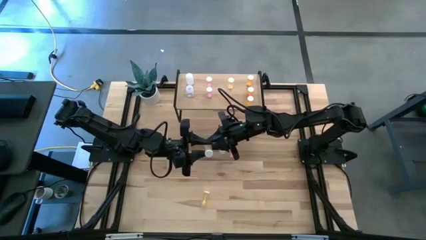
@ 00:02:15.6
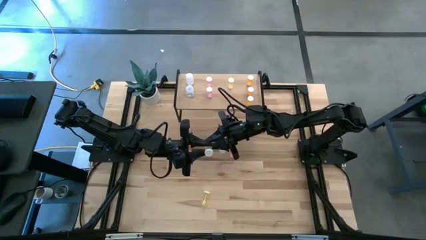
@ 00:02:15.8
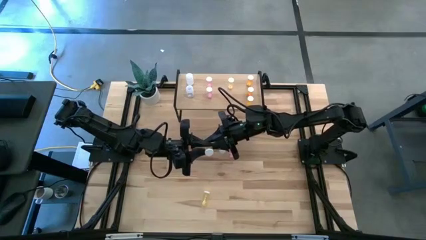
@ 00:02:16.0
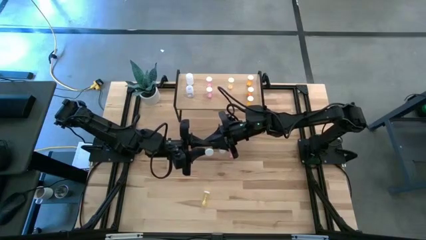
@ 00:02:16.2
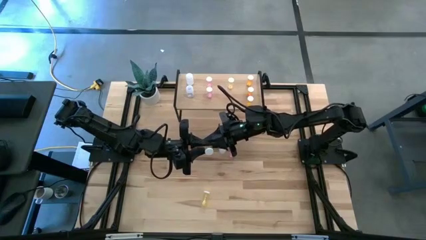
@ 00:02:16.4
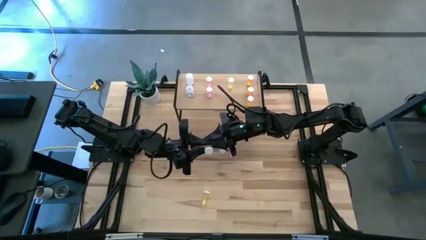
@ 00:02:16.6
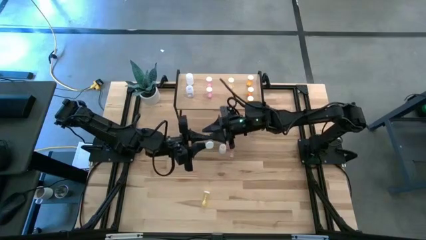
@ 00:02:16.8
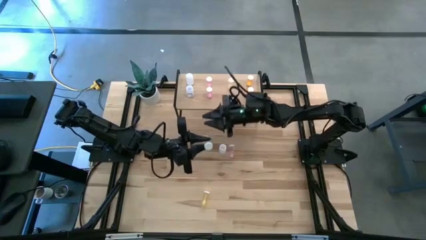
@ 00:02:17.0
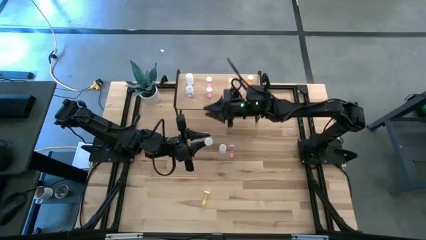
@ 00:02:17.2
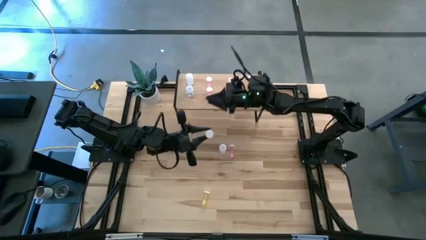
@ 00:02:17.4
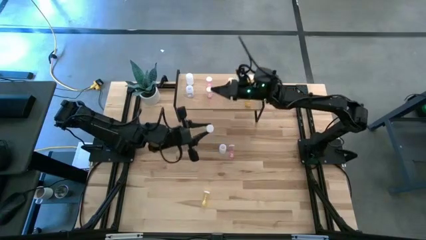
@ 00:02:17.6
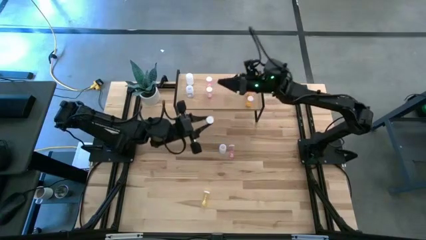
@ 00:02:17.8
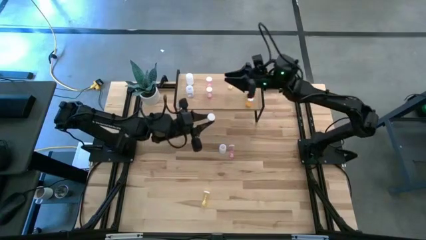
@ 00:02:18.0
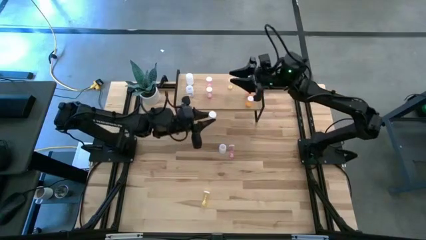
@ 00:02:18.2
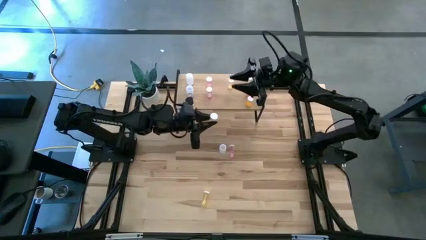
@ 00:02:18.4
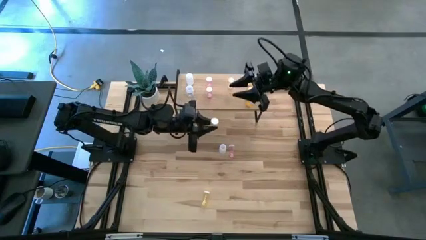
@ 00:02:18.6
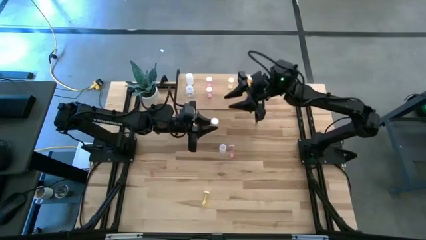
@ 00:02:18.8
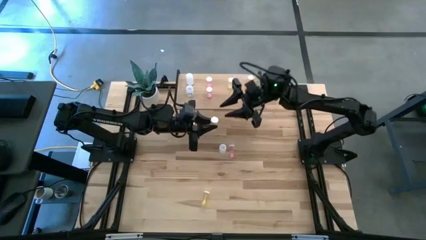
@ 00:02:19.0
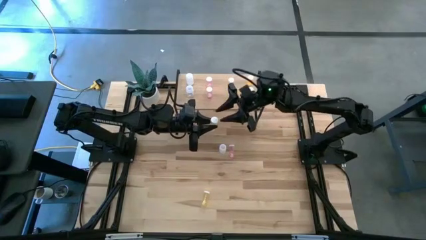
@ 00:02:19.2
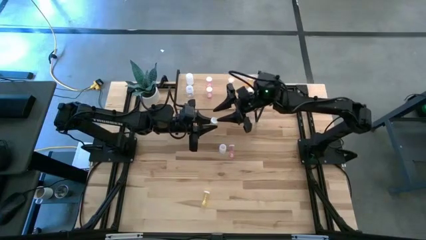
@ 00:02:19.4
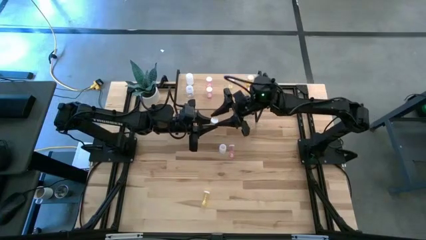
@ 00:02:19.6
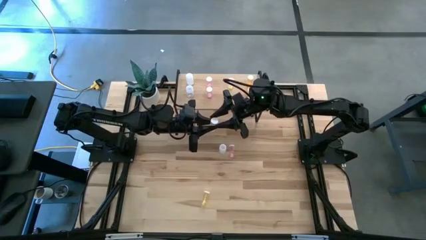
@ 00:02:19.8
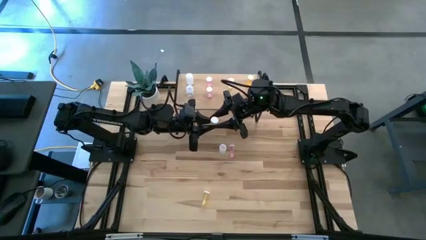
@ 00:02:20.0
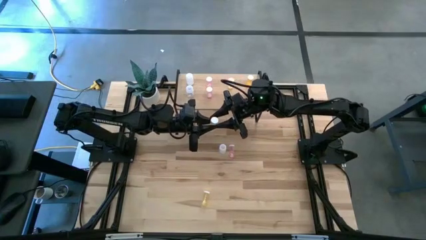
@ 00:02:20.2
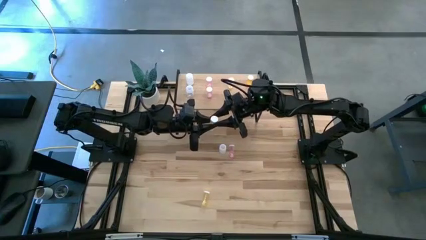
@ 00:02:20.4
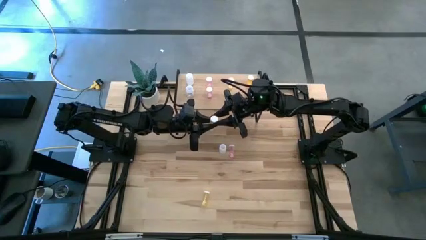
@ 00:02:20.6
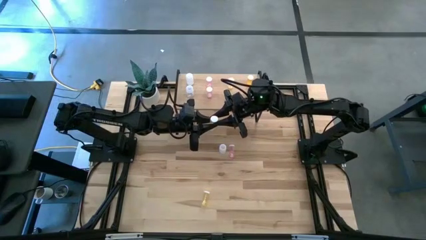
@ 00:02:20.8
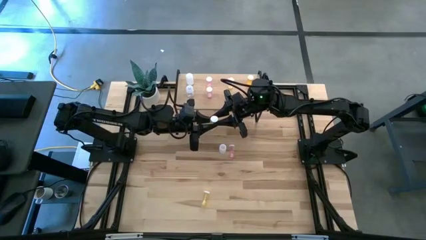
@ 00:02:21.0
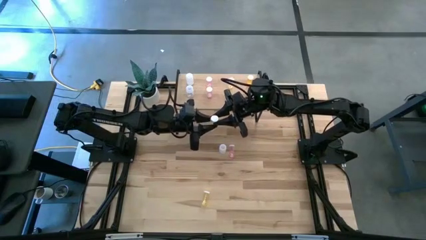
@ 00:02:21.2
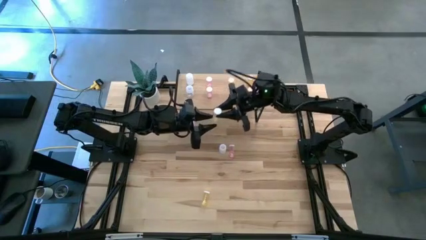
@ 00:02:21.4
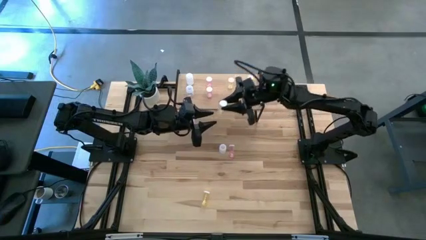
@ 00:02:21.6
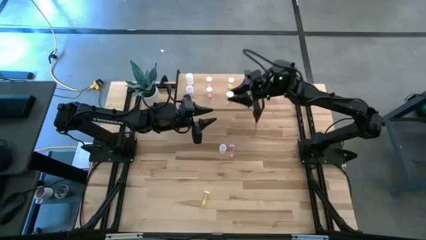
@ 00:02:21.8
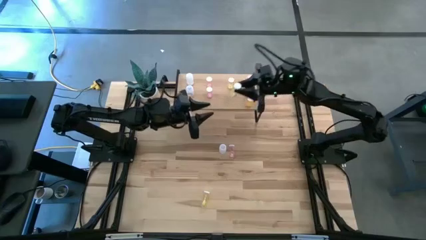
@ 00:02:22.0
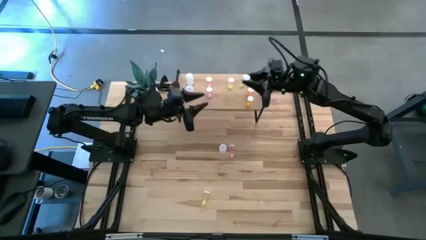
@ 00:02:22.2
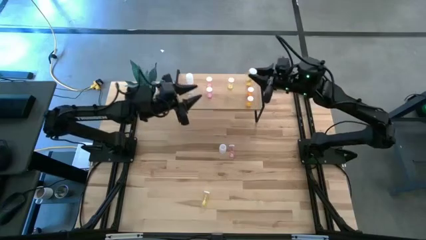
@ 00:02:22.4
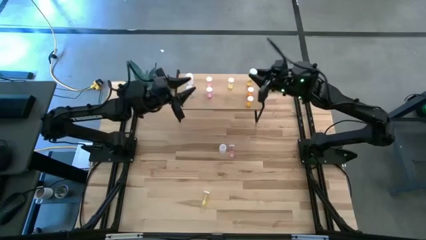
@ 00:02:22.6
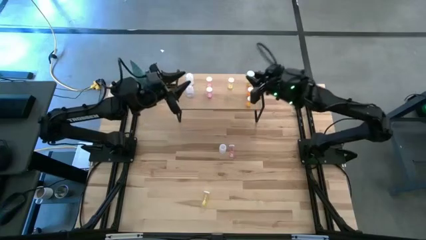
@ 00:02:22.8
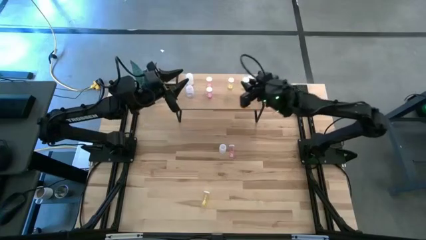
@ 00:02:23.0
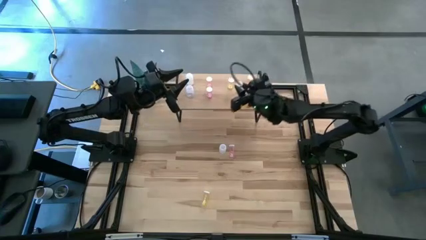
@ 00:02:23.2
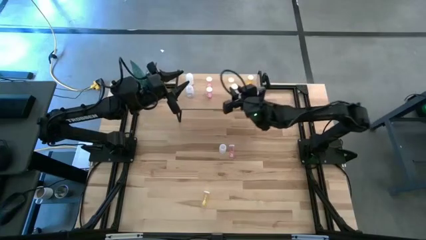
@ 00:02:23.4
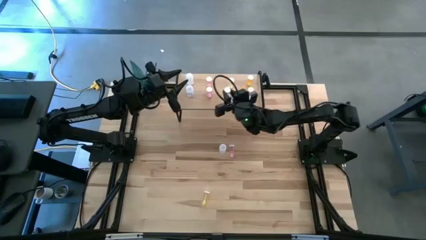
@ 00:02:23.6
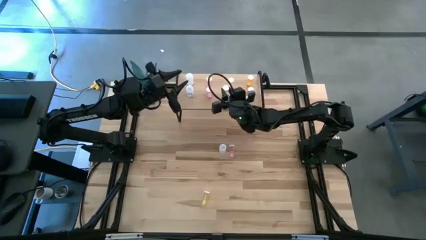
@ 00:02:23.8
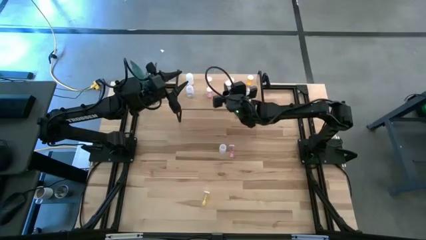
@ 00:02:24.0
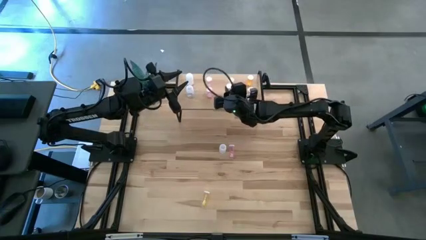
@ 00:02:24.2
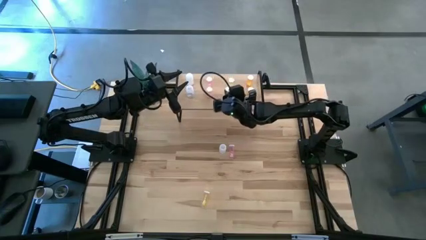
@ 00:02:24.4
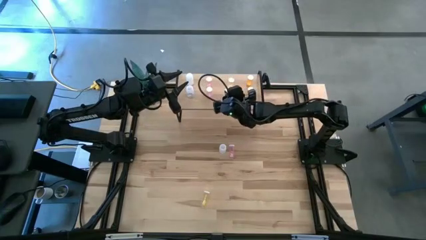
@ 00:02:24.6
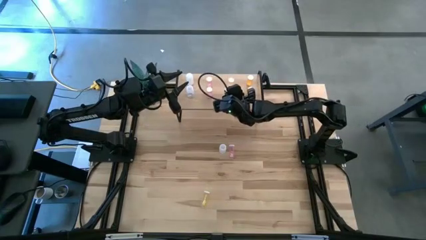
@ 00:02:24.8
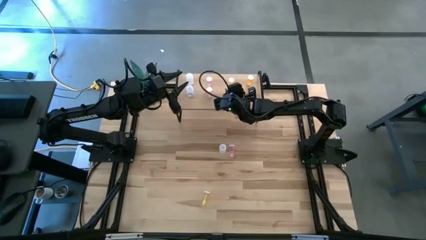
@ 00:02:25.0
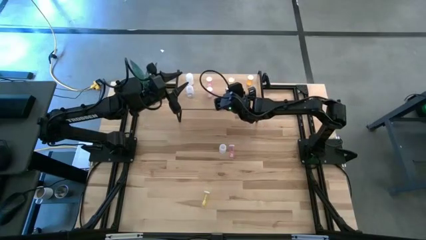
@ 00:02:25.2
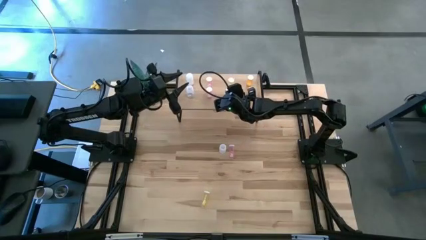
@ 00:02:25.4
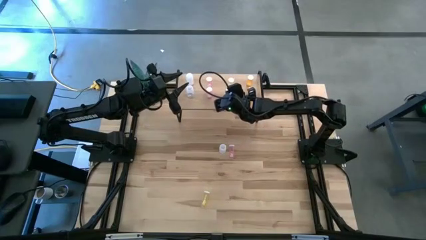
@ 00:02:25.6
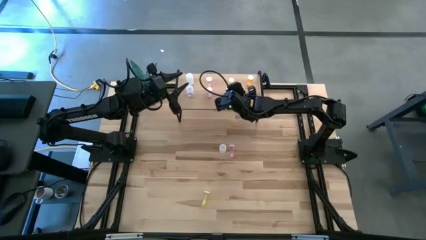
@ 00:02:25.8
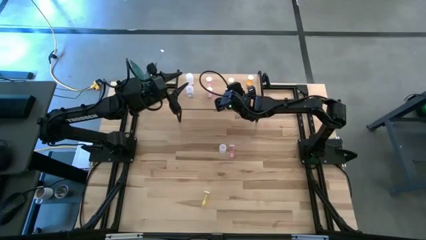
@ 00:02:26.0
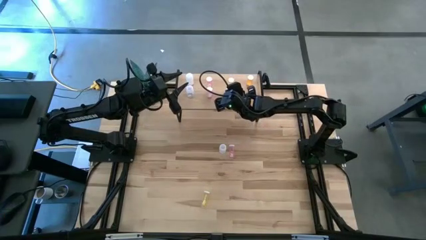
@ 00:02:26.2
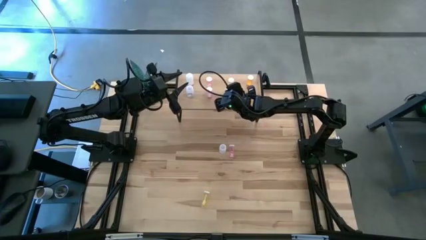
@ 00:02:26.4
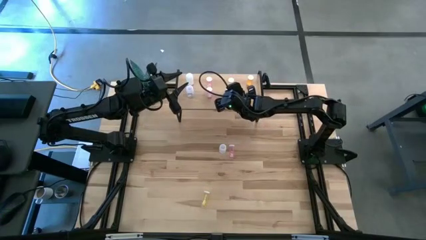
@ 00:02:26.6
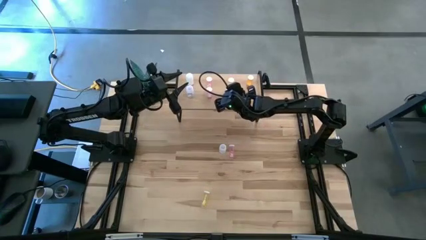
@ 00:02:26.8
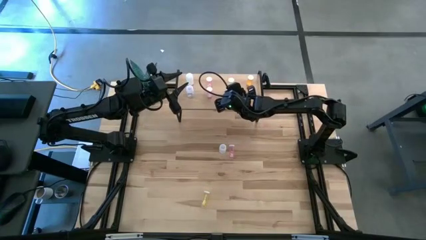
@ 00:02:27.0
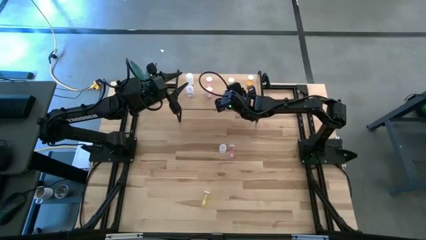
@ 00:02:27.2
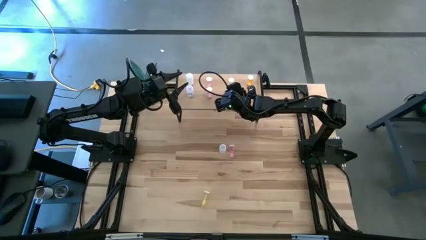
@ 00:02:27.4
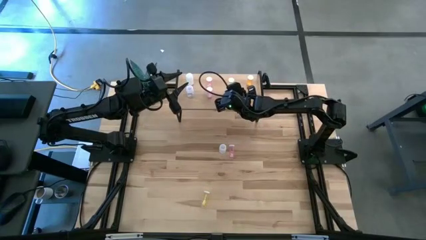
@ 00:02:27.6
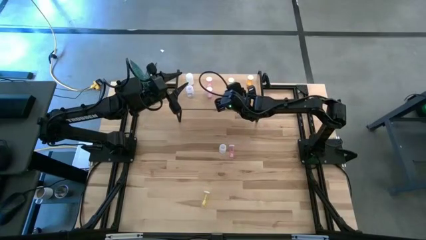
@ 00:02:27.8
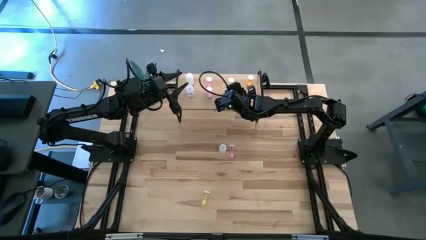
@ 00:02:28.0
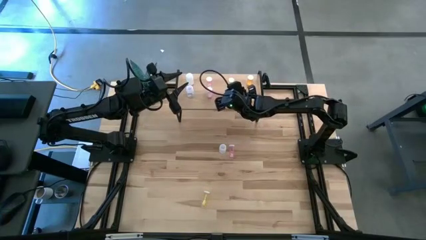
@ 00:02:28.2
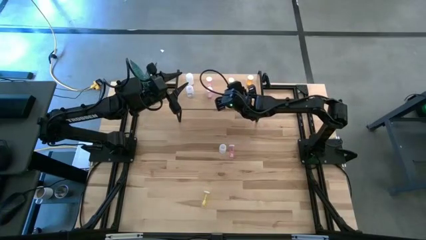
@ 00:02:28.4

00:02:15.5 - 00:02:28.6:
Task: Pick and place medicine bottles onto shelf by color
Put the right yellow pill bottle aligned with the other yellow pill bottle on the shelf
